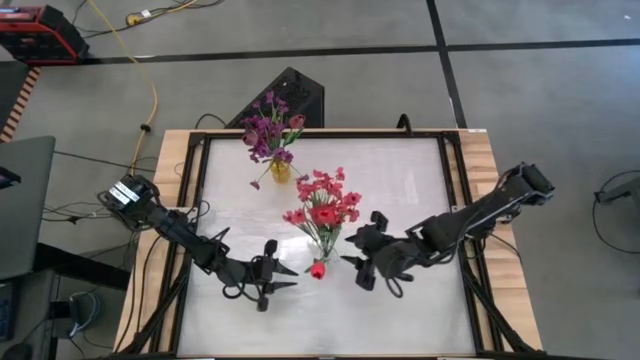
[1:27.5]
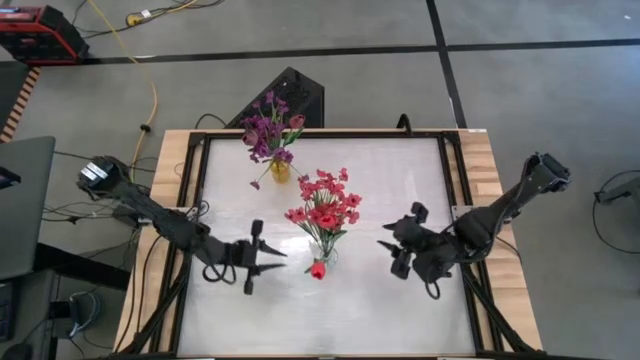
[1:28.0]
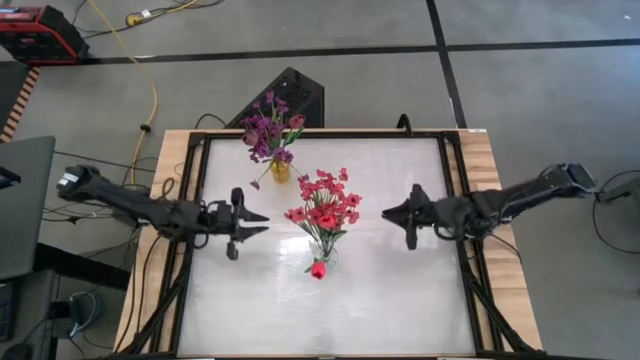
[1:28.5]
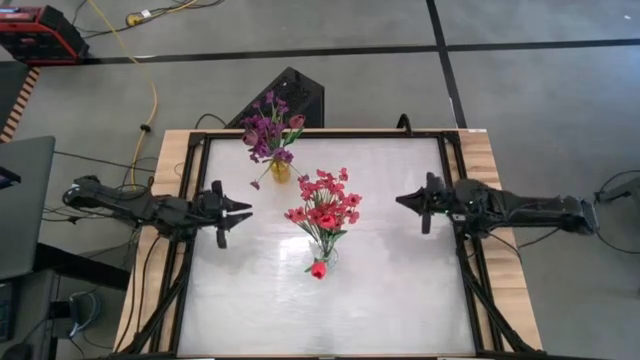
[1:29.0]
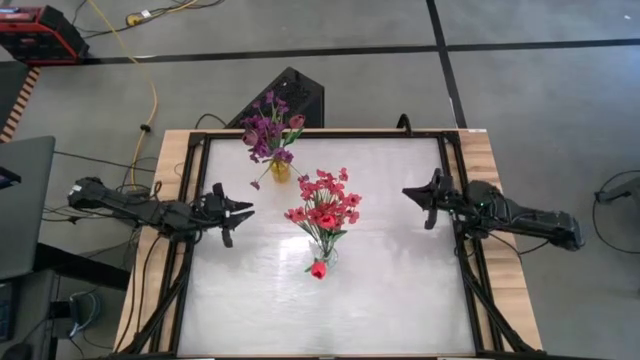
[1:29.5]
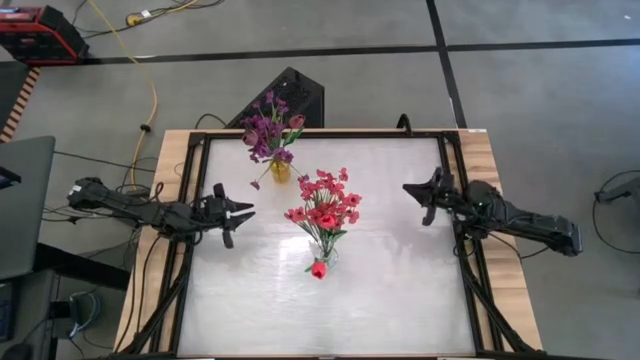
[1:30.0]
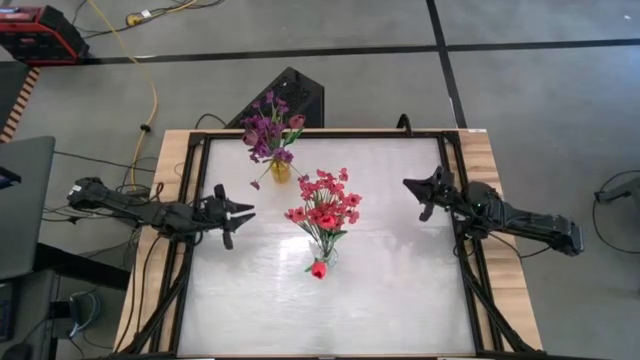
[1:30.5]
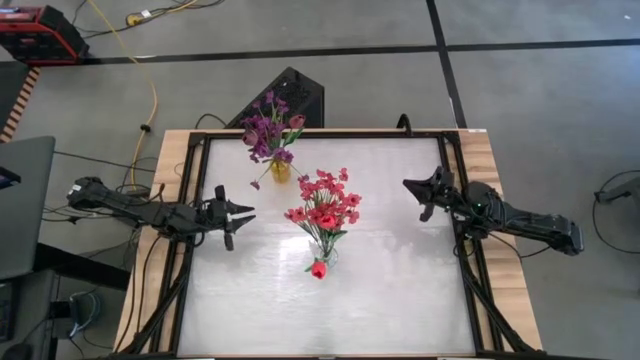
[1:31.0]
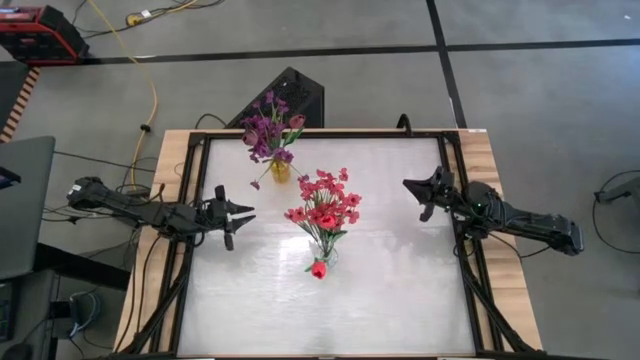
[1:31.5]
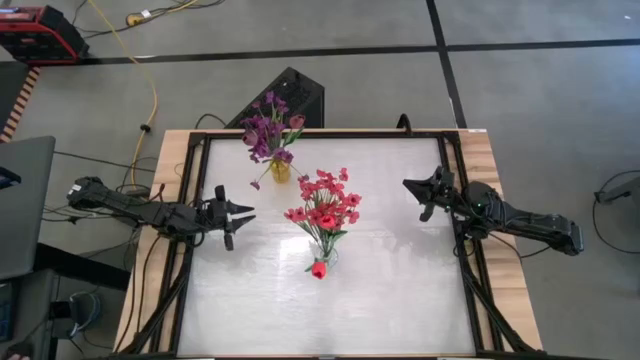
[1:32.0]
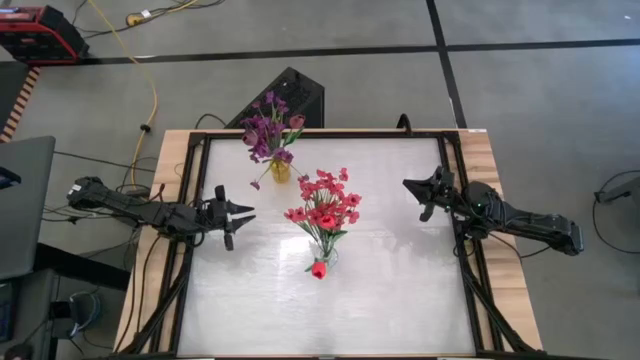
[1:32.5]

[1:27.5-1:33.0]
Task: Sort flowers into vase by color
Return to Home Position

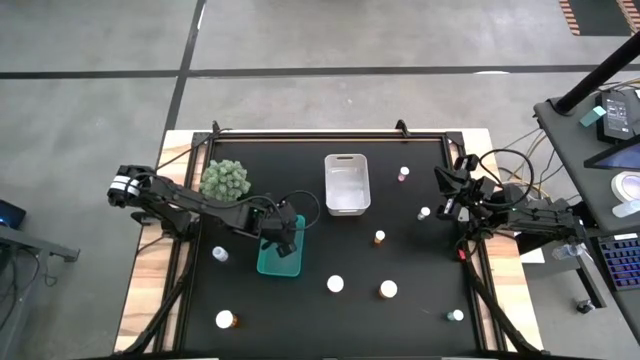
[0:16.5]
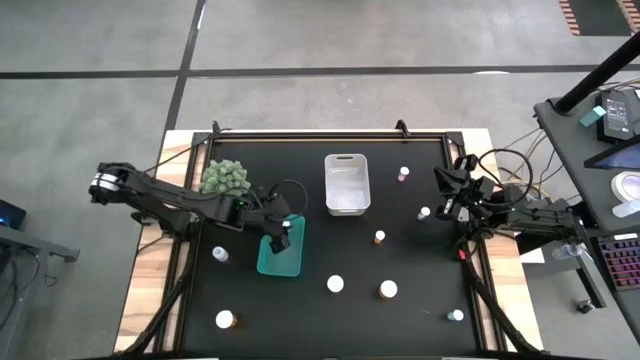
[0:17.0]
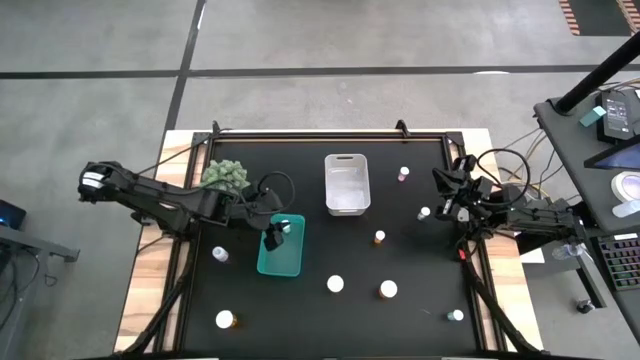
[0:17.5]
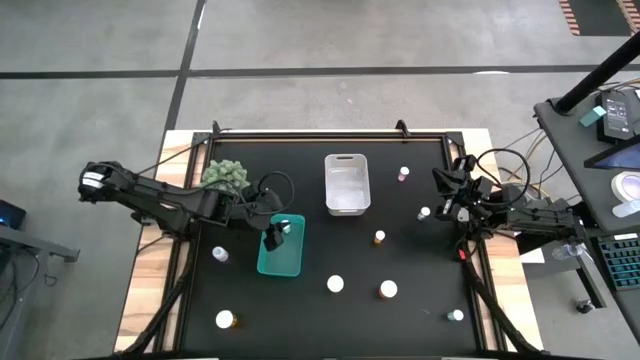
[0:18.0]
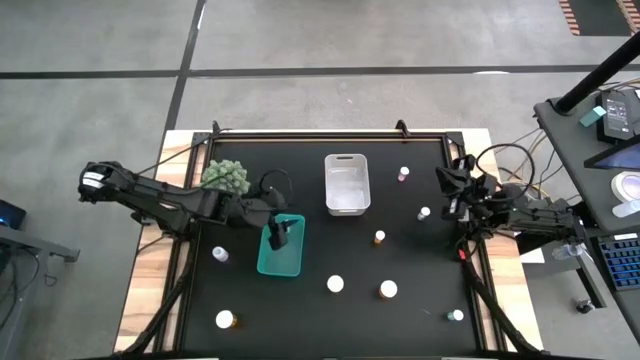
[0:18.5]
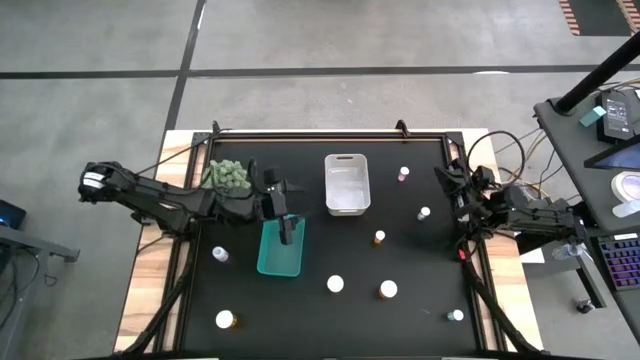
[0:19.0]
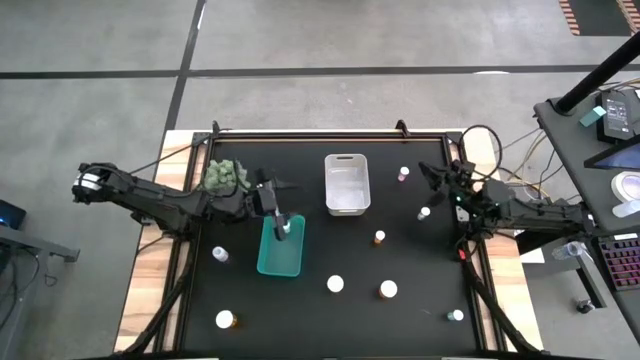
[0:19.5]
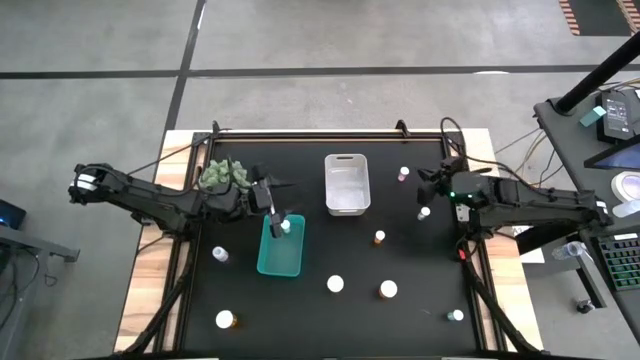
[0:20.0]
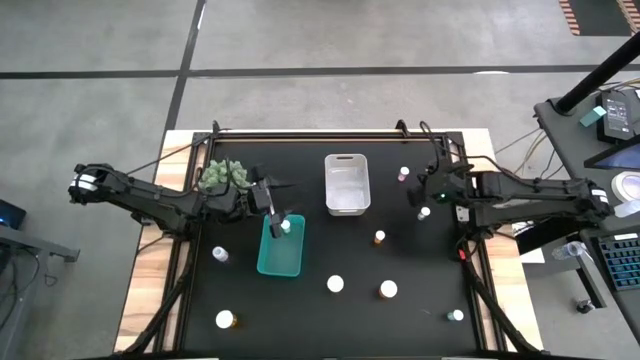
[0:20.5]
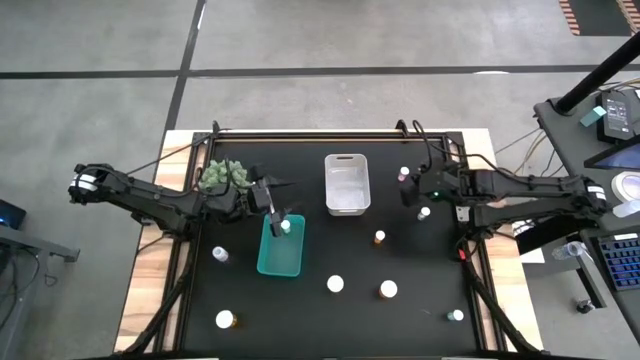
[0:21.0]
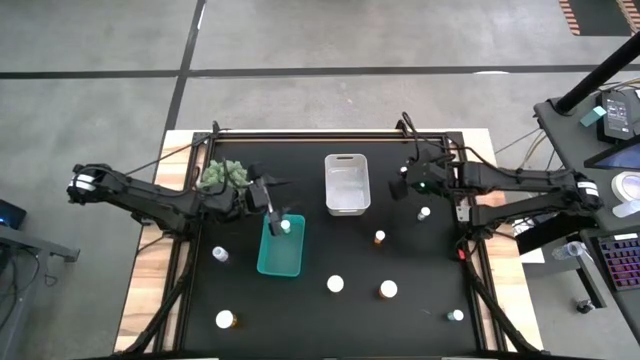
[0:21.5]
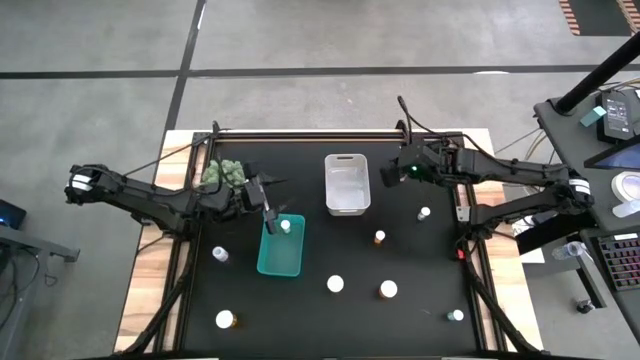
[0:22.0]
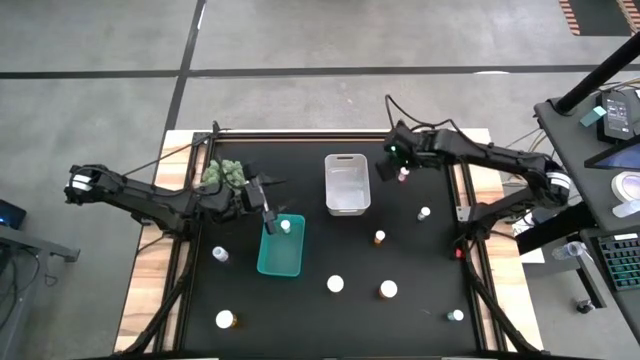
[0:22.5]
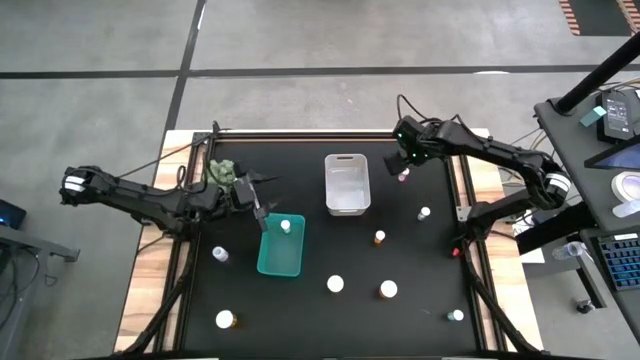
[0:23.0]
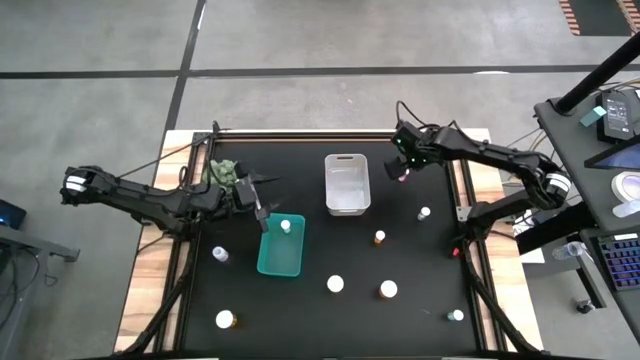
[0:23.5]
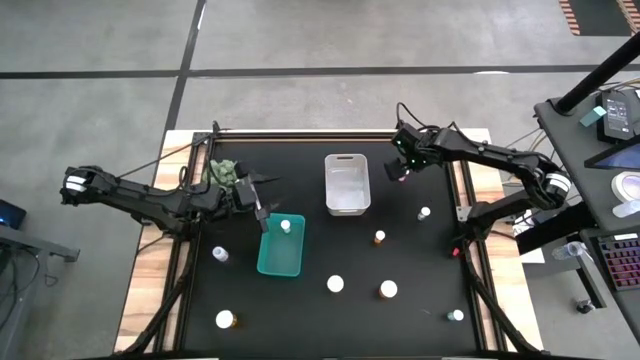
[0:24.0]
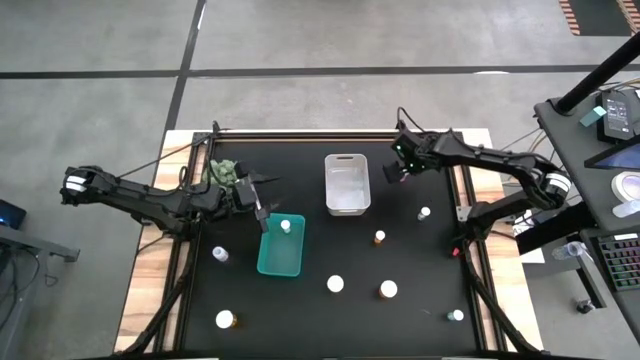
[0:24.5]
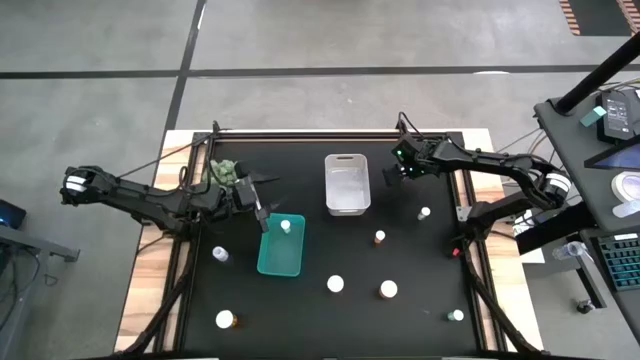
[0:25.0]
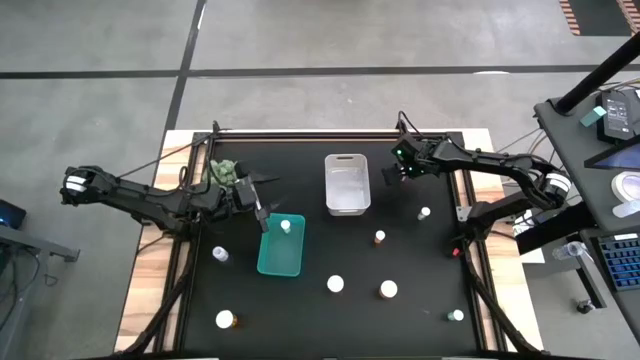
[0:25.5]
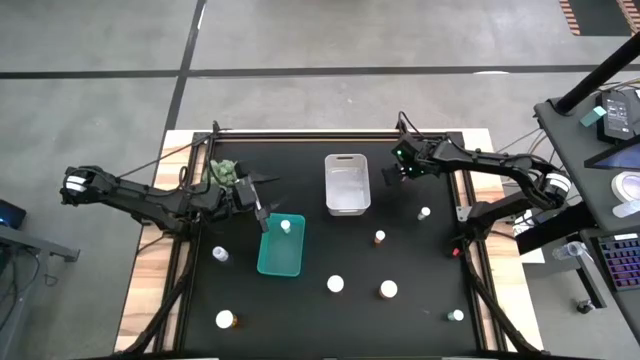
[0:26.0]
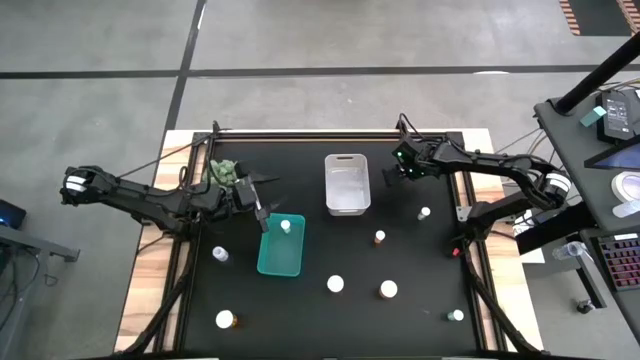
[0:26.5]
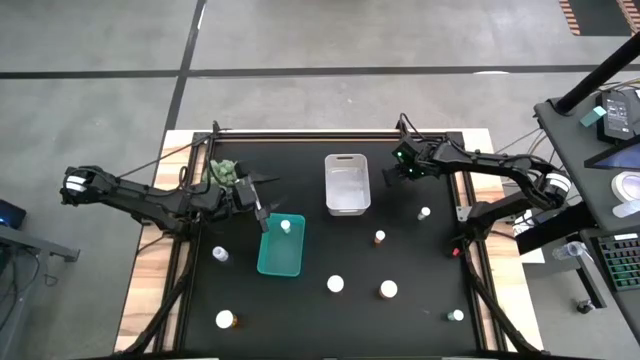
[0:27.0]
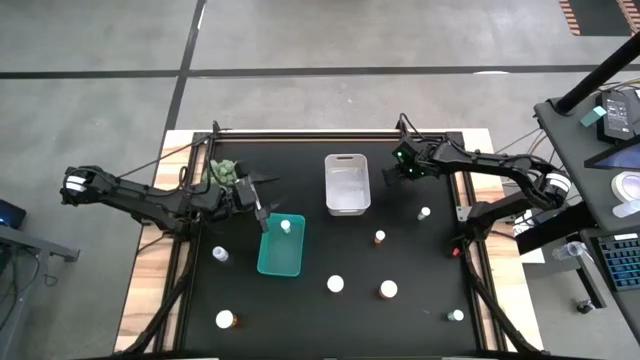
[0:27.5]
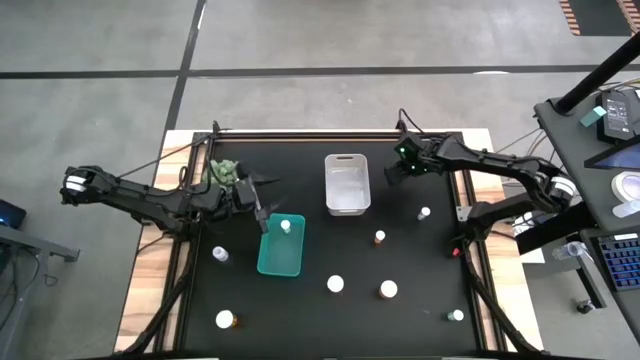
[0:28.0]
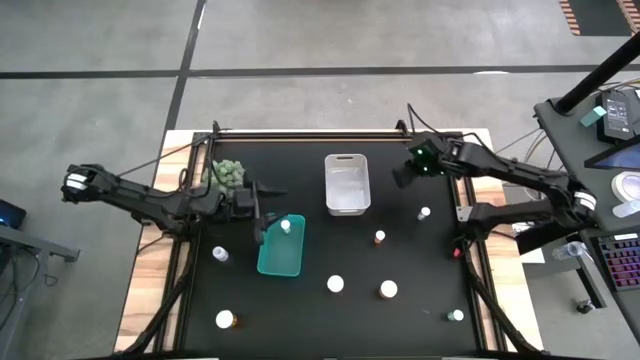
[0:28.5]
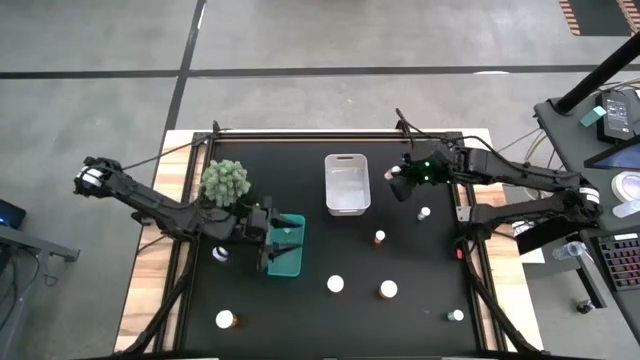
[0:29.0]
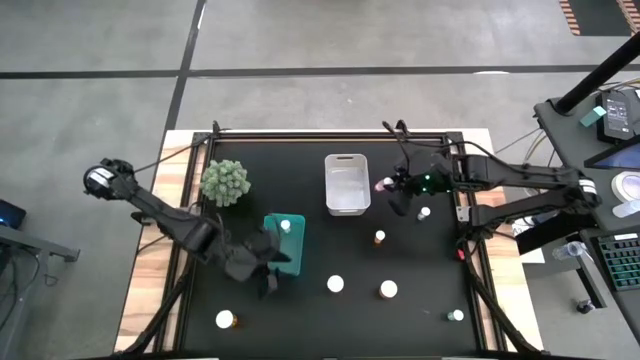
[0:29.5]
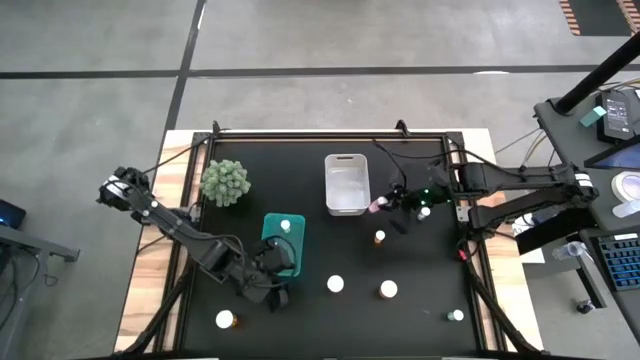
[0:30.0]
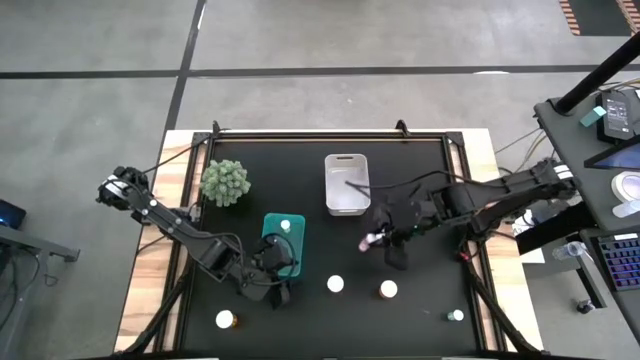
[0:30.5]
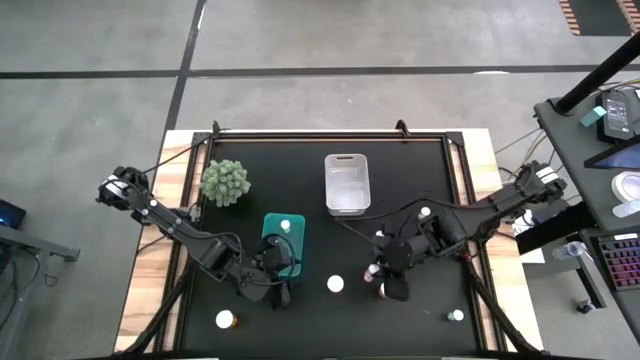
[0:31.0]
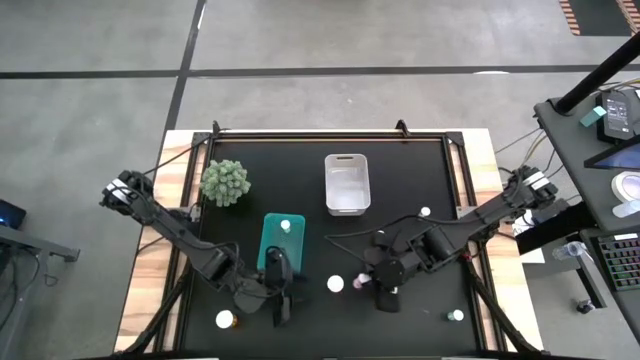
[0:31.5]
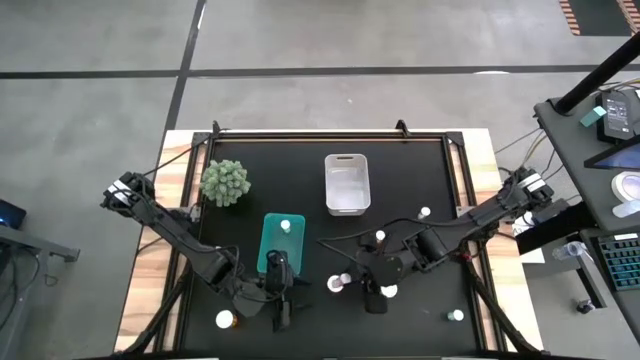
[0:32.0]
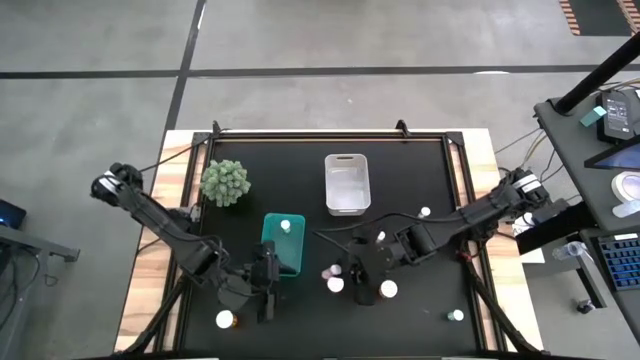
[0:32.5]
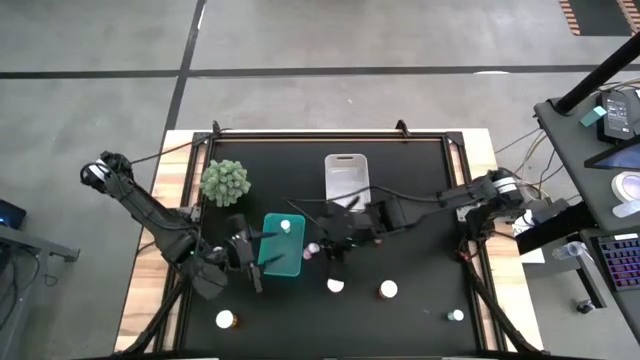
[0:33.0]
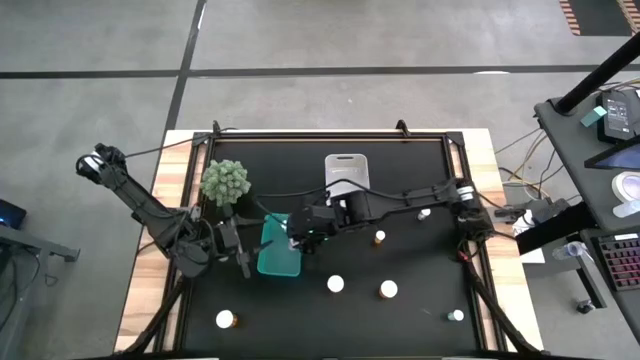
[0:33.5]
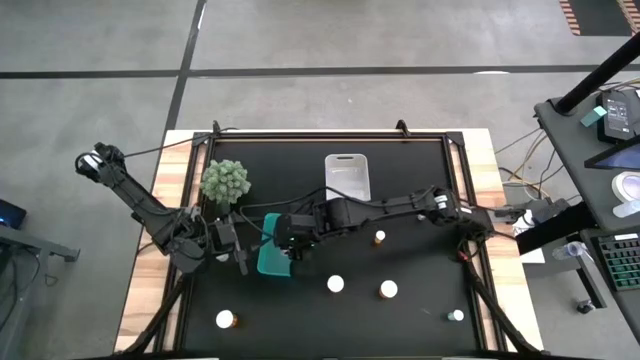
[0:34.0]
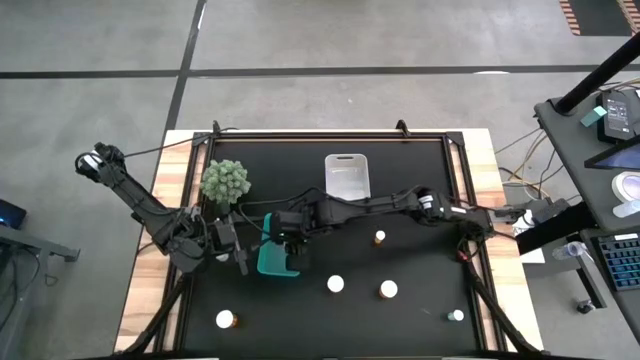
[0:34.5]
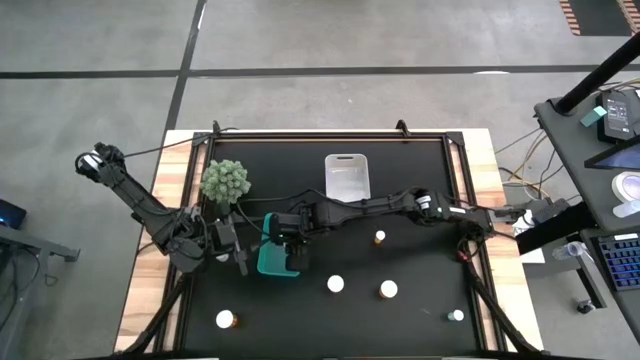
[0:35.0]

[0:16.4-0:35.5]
Task: Pick and place medicine bottles into bin by pill shape (circle, oval)
Put the pink pill bottle into the green bin
